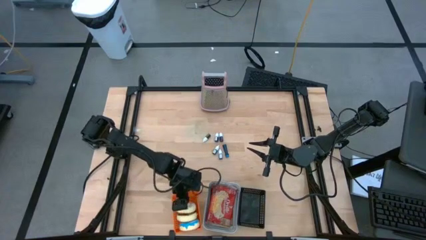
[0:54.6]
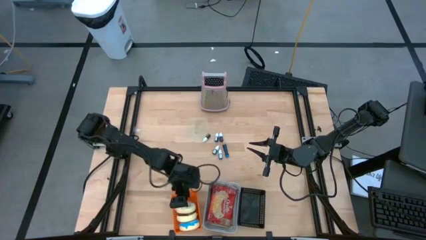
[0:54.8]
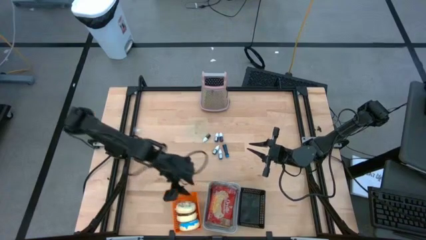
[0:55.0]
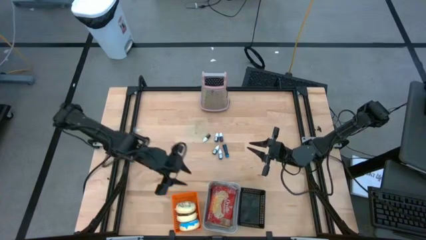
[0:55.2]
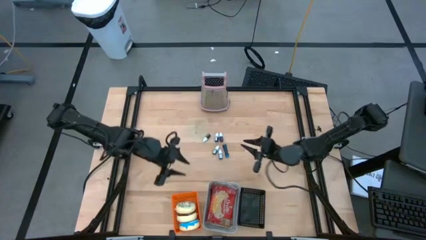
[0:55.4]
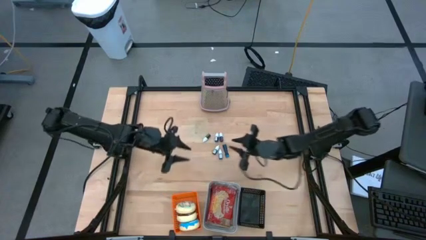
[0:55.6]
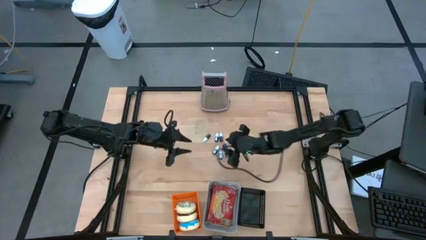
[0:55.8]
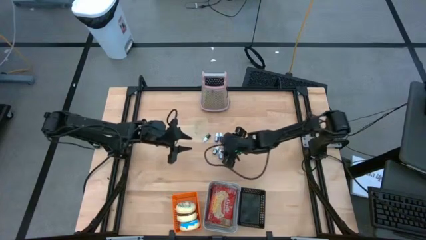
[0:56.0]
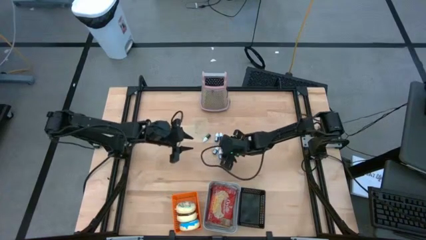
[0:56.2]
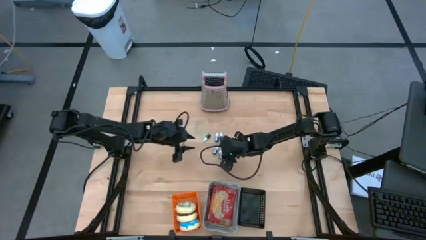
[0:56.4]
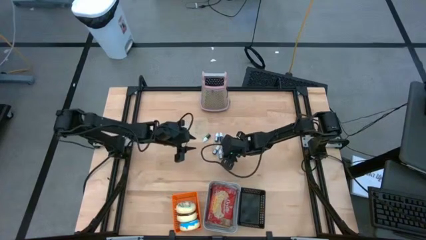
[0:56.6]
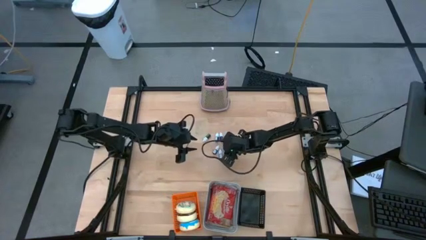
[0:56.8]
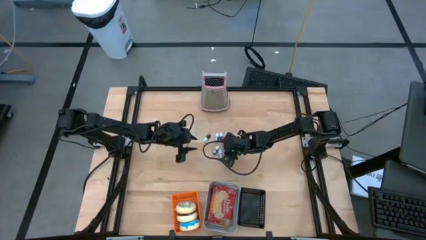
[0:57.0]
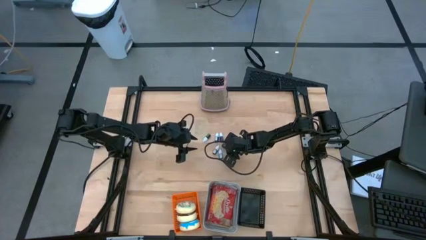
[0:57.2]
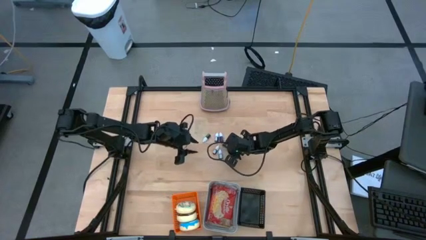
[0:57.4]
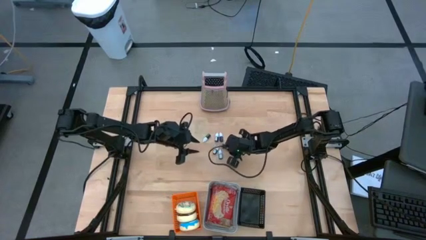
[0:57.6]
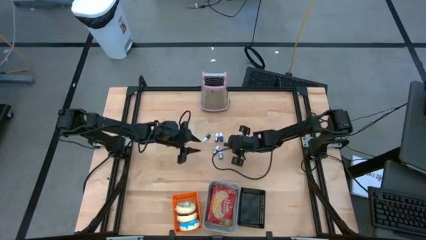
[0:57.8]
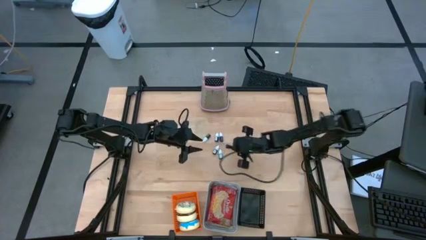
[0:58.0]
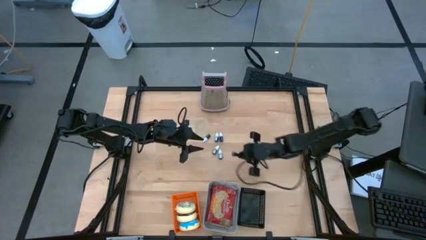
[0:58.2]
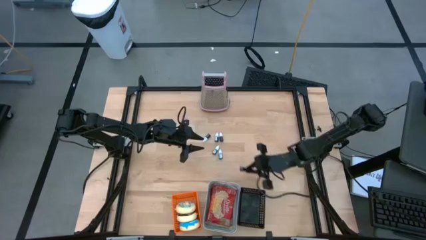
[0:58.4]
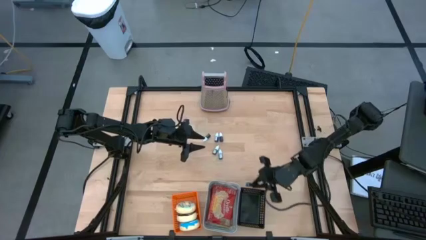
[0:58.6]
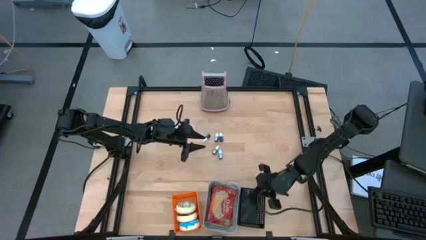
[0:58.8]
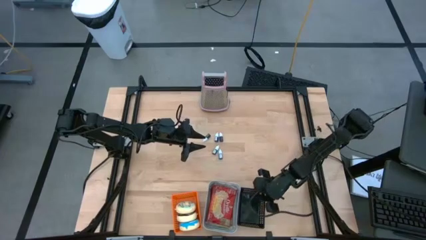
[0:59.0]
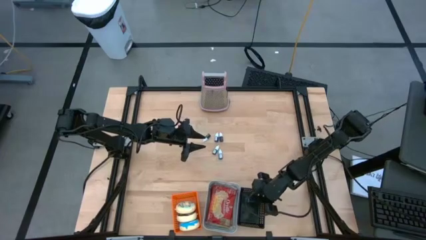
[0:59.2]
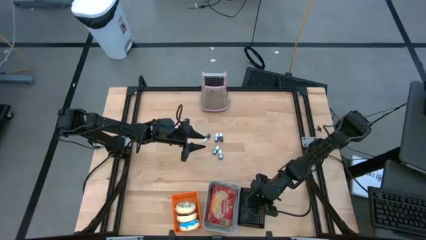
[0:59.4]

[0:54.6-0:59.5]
Put the blue food coloring bottle into the black bin

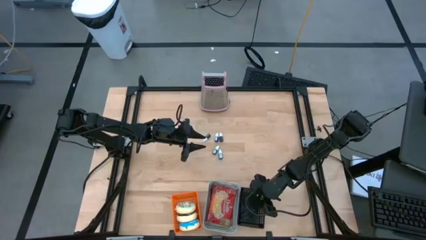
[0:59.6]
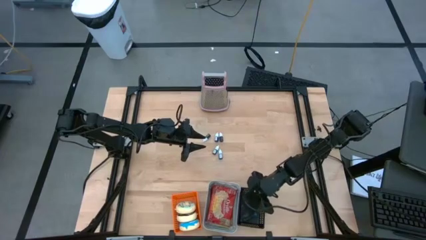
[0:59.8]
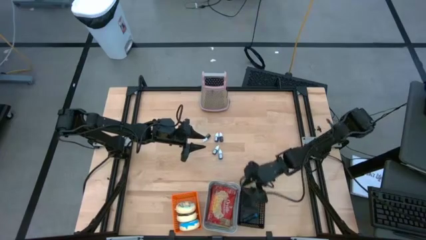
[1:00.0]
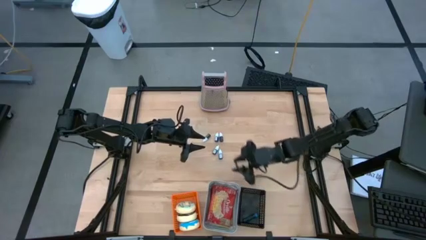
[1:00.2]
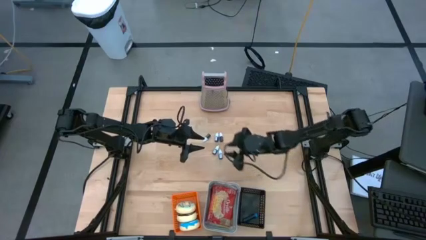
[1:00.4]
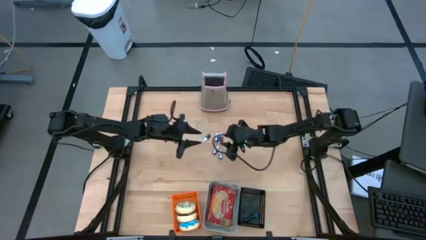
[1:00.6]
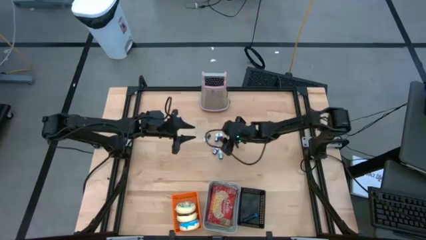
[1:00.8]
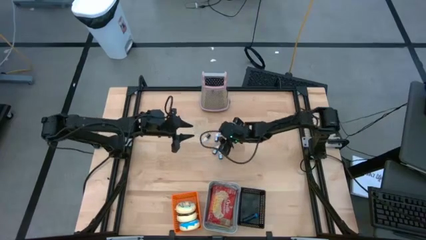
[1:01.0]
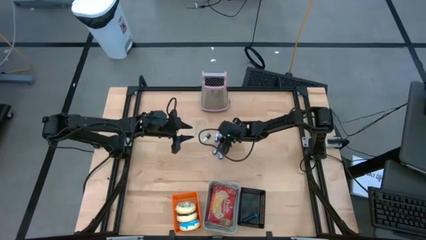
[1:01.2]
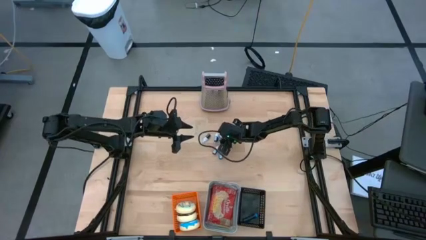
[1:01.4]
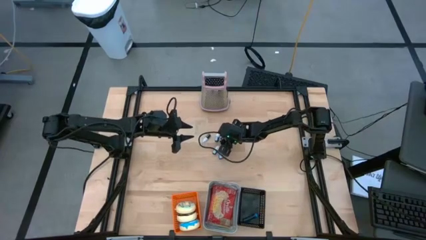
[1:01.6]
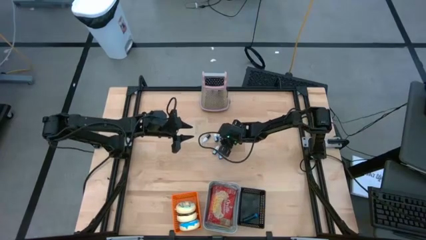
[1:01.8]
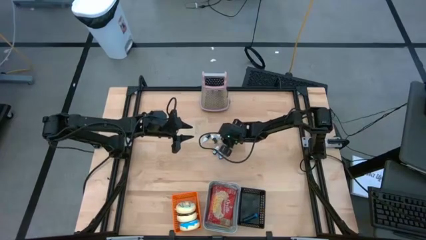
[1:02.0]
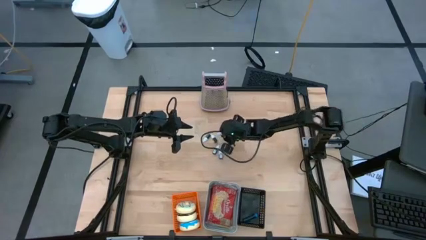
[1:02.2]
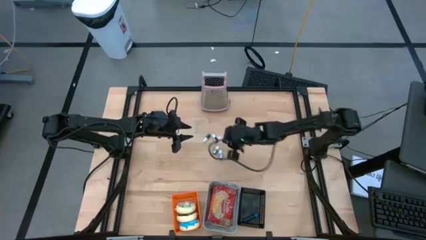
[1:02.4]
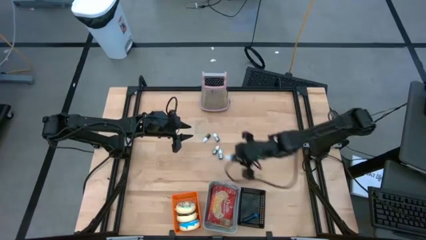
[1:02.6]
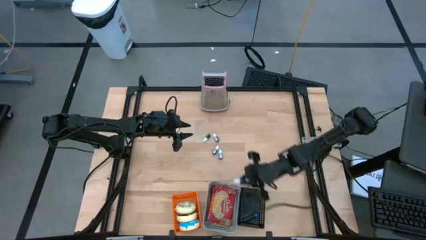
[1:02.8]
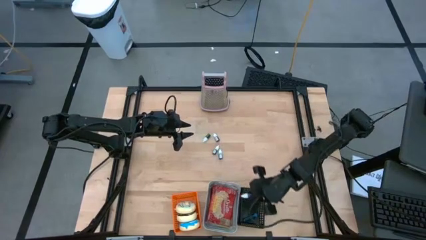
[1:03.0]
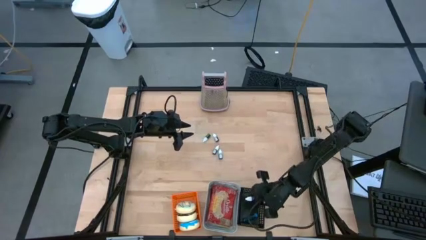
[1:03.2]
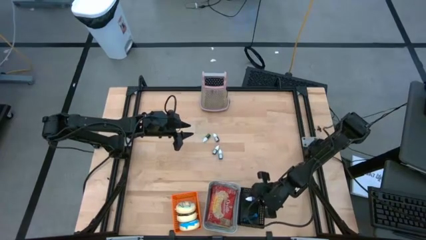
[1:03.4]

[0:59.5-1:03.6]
Put the purple food coloring bottle into the black bin

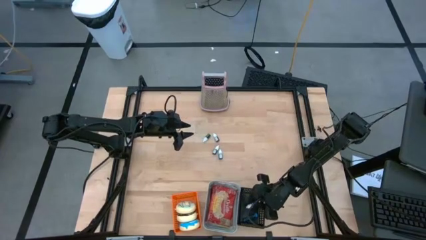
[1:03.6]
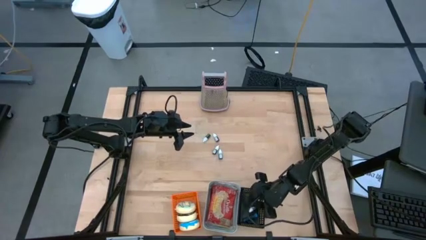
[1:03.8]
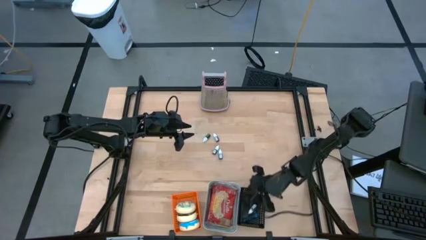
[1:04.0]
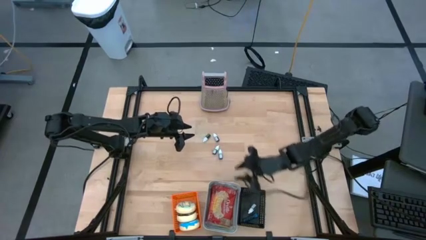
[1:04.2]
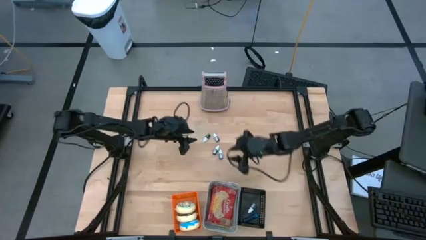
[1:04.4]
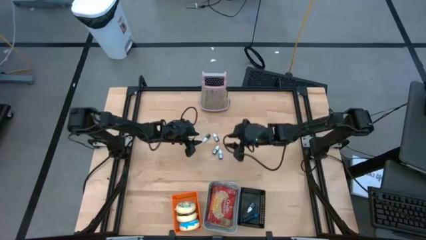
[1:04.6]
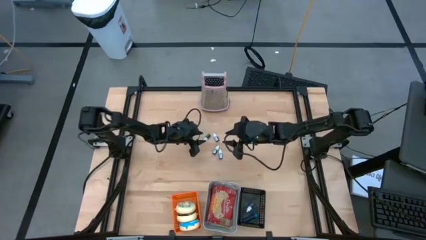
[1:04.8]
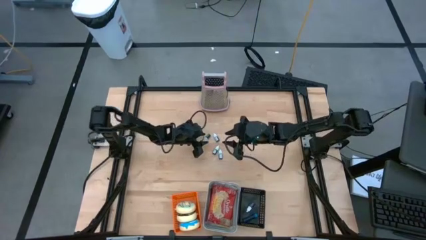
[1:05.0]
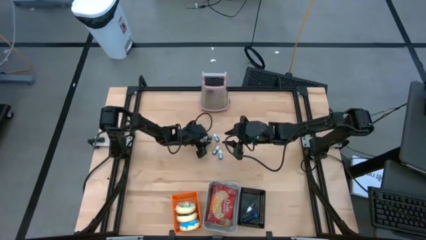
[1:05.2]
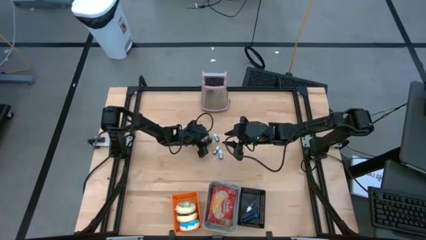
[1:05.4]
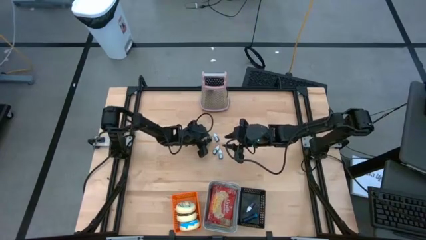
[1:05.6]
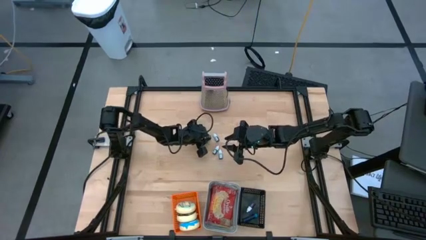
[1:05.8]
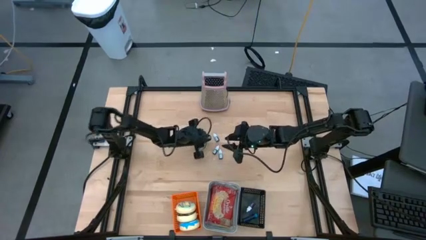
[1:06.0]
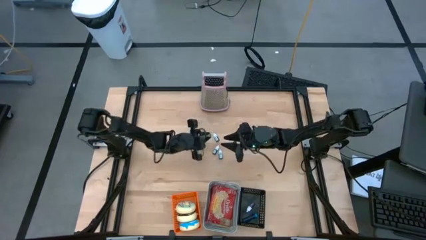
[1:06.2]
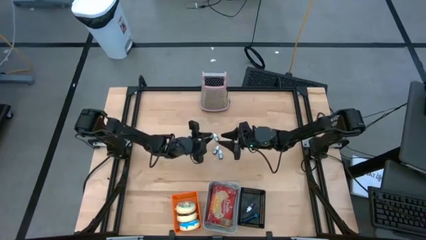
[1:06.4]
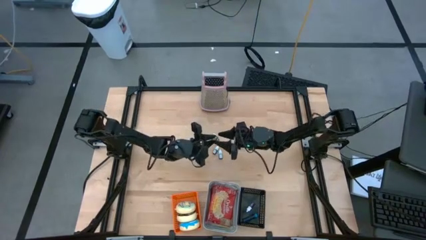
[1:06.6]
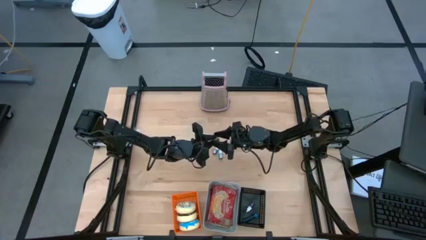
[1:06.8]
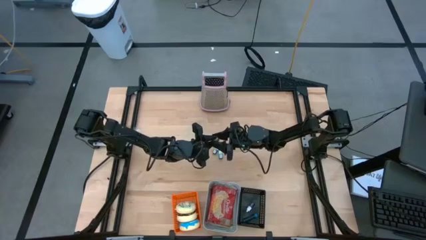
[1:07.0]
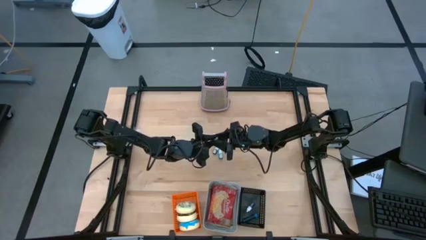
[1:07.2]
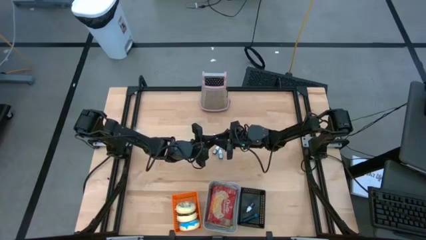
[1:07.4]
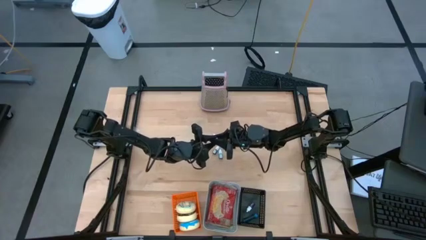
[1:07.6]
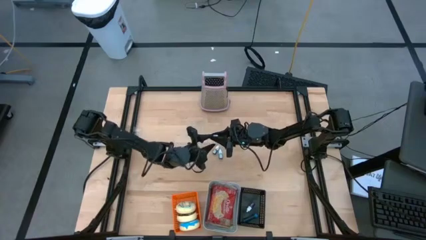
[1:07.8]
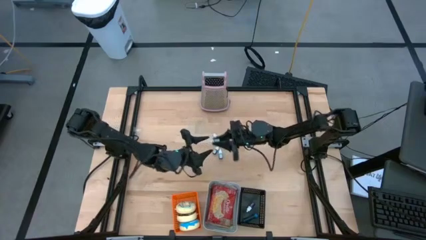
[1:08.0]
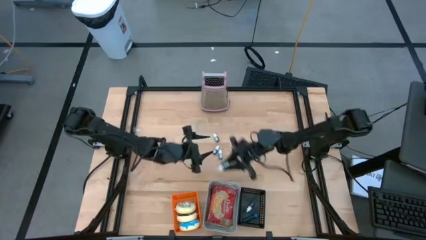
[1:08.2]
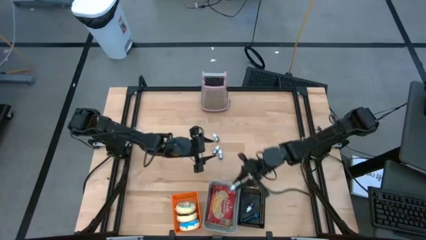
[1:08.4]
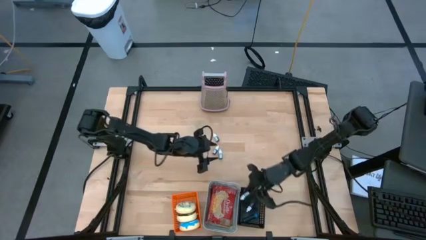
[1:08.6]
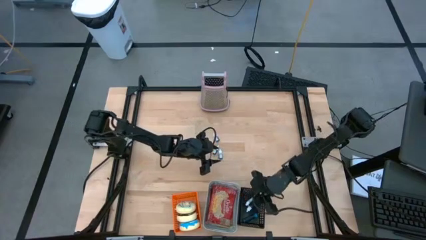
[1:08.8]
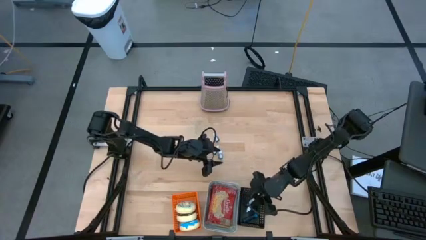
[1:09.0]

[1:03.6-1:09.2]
Put the green food coloring bottle into the black bin
